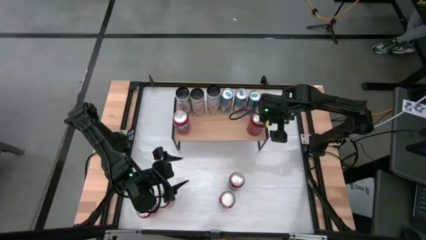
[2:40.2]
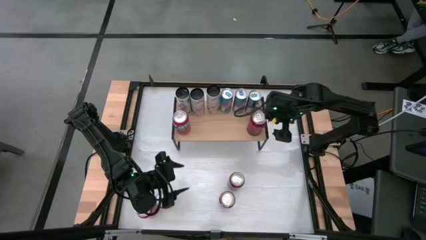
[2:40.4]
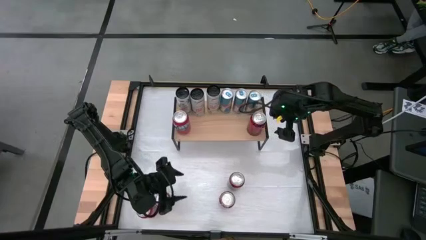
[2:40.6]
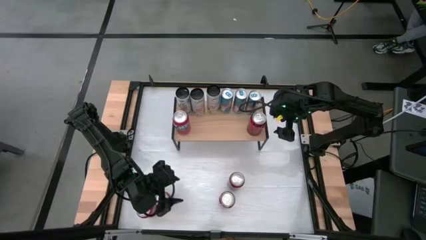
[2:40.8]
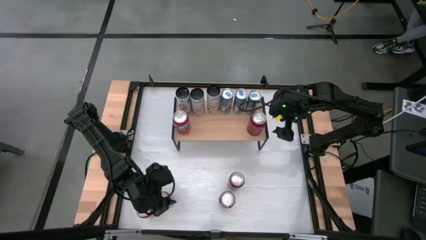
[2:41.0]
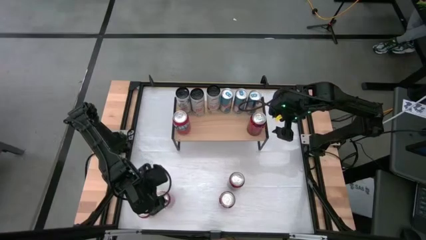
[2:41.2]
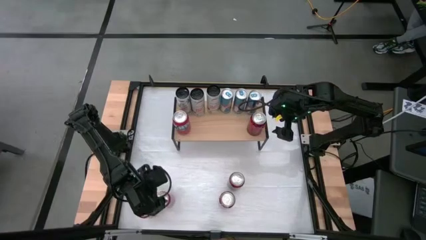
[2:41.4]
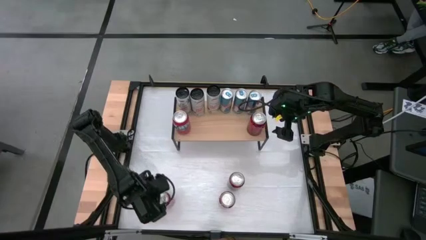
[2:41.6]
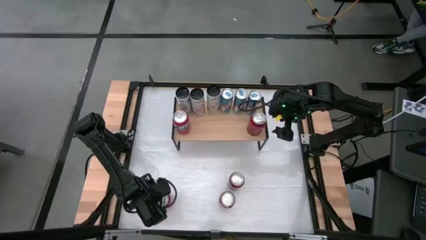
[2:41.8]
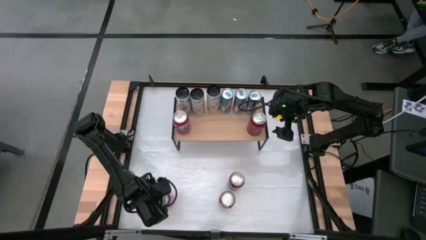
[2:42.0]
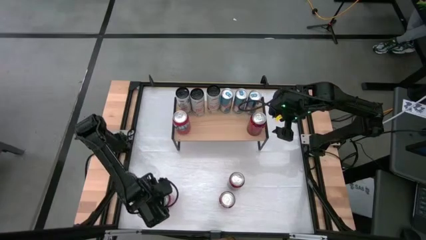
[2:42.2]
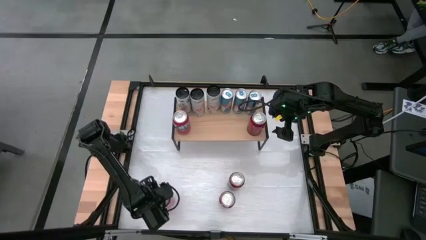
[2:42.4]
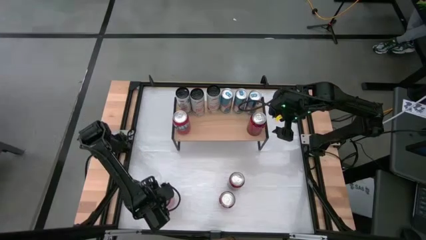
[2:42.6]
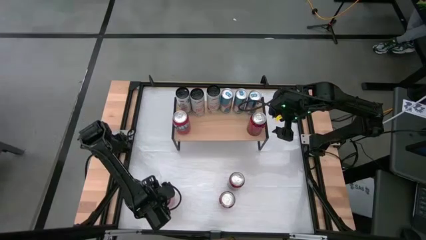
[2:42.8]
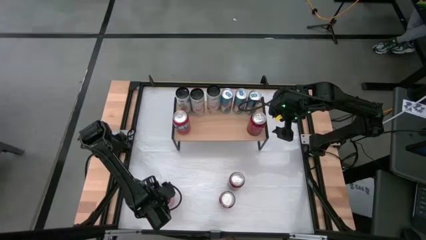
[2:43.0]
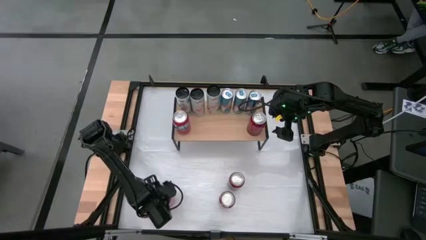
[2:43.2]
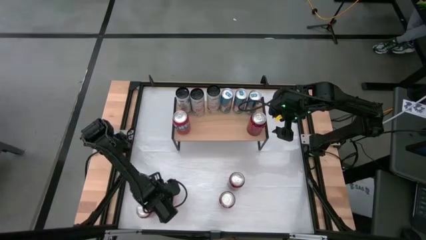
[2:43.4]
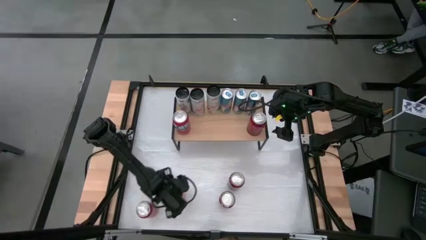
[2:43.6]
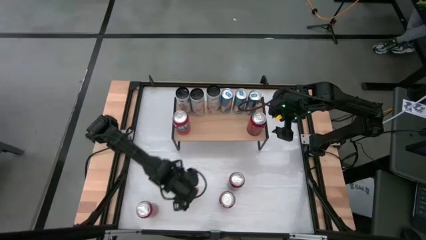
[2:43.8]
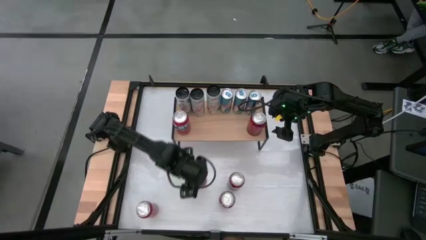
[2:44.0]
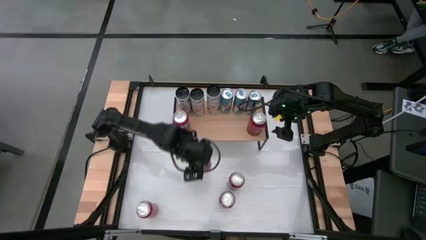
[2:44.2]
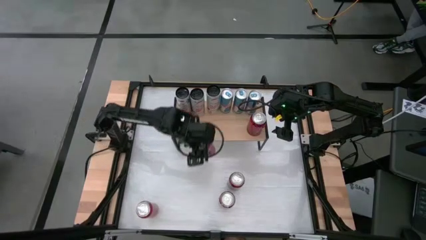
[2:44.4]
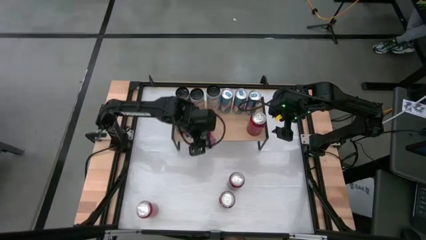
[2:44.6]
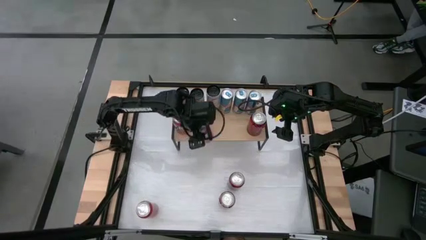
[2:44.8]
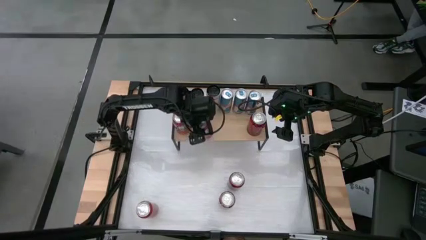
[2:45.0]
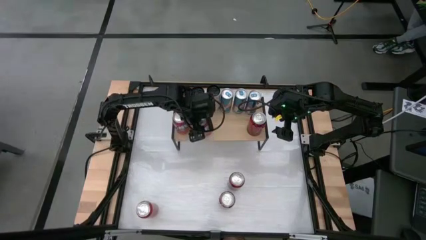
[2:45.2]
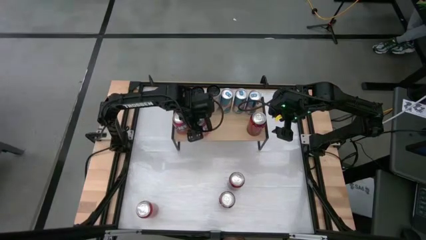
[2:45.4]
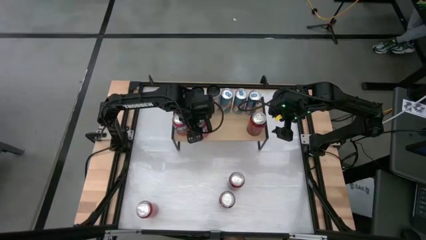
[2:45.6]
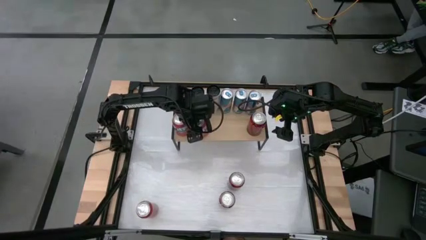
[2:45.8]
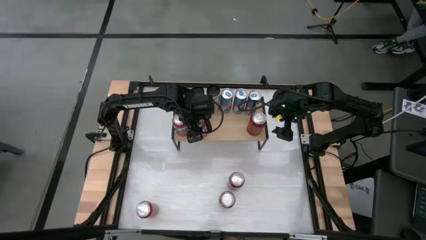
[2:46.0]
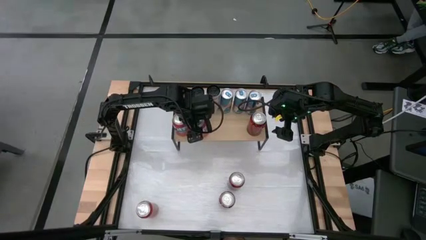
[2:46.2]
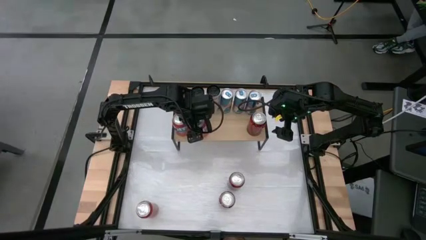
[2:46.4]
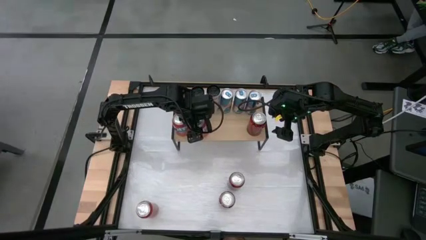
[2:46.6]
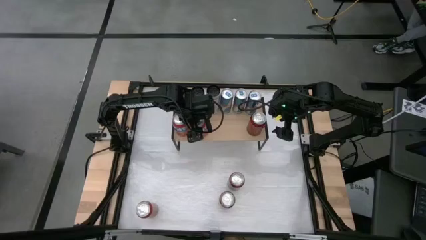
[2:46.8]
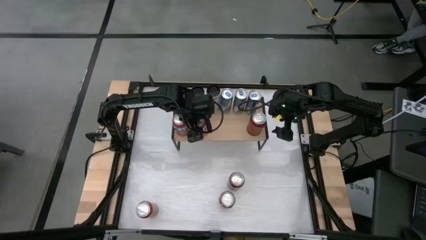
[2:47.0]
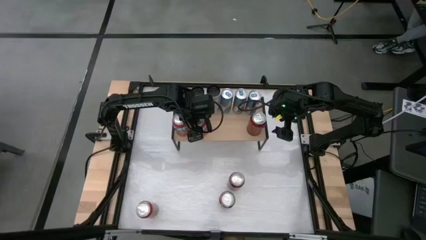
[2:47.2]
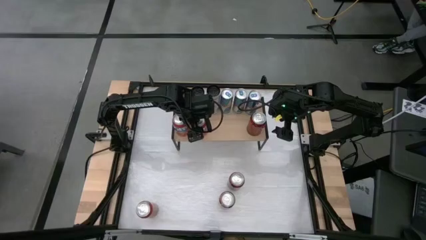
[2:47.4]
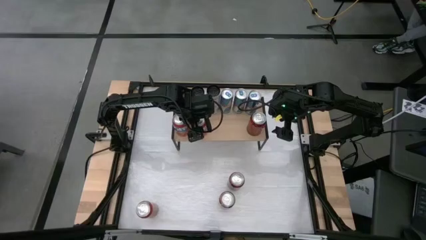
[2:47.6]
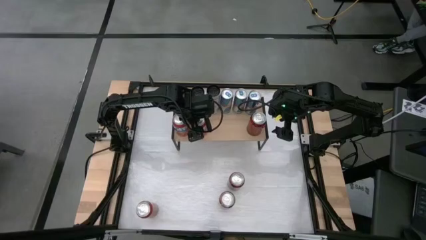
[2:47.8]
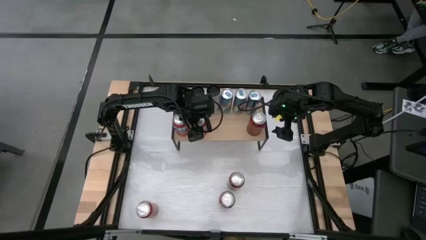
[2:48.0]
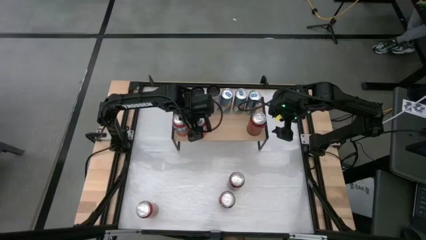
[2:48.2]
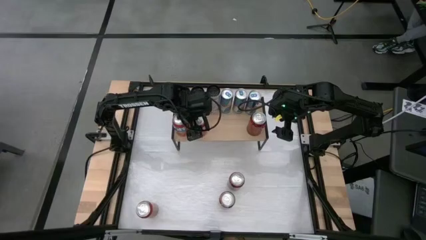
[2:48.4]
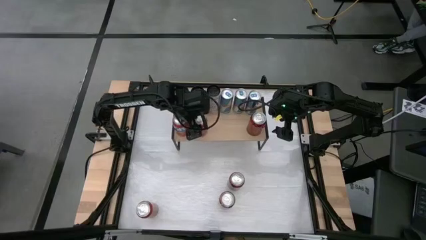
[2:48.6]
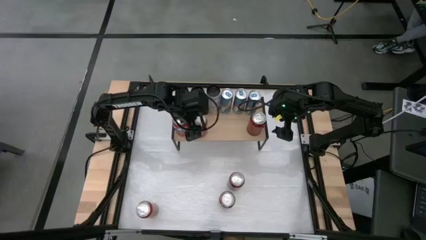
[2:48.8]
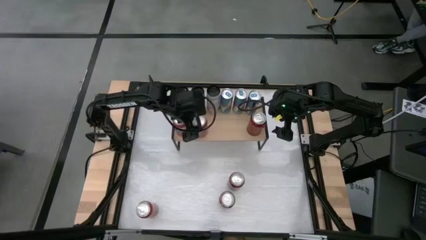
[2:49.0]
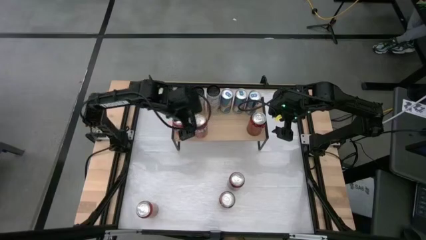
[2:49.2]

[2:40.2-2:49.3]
Task: Place canned beverage on shelf
Put the top orange soda can on the shelf aligned with the white soda can

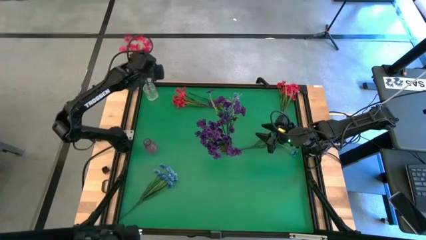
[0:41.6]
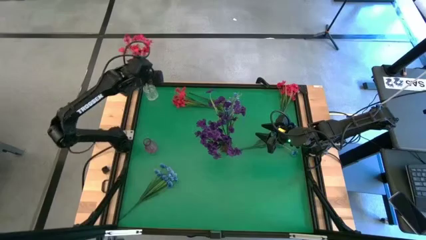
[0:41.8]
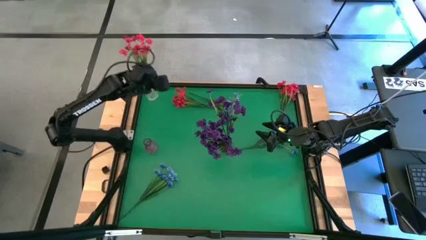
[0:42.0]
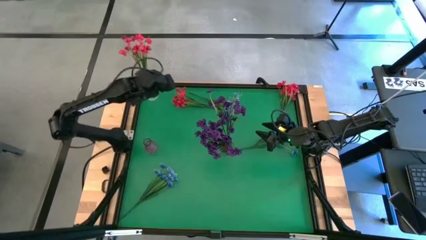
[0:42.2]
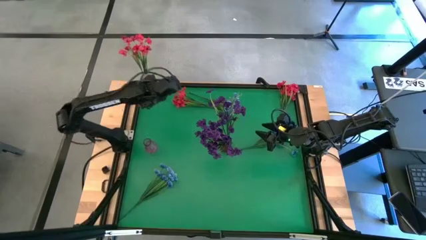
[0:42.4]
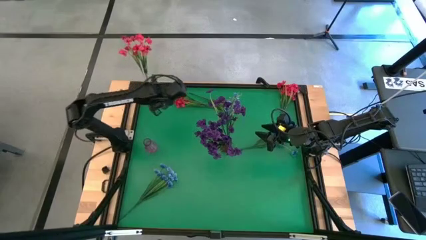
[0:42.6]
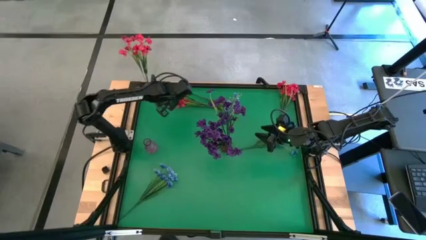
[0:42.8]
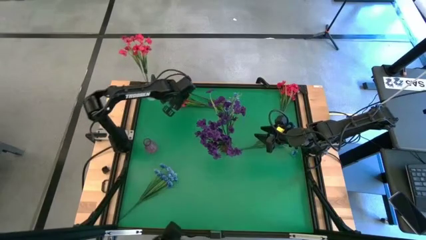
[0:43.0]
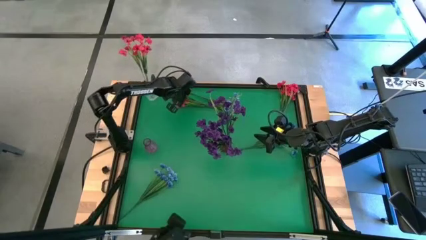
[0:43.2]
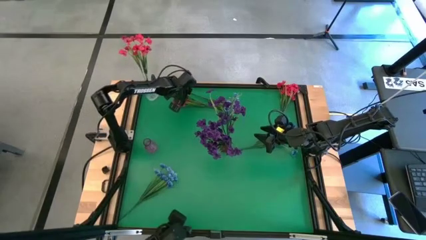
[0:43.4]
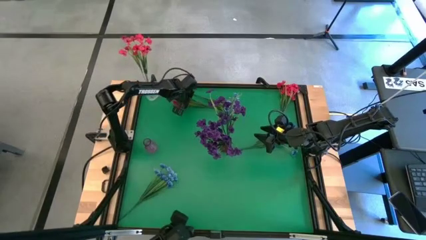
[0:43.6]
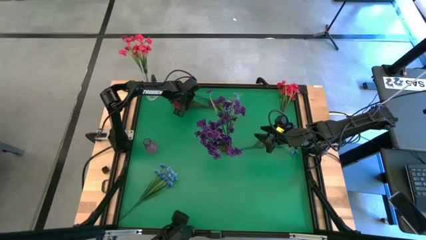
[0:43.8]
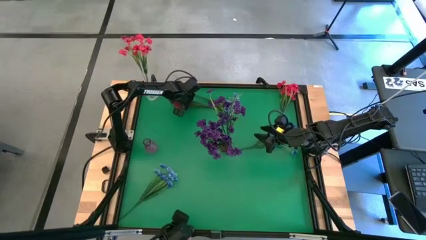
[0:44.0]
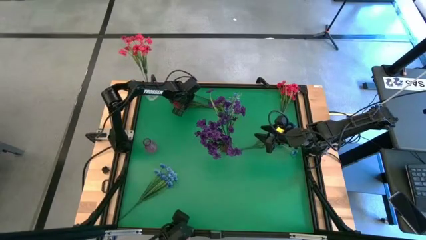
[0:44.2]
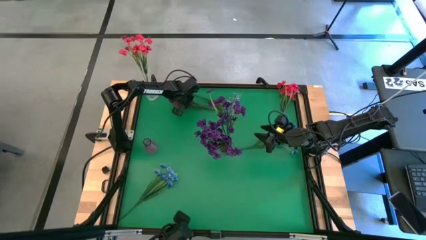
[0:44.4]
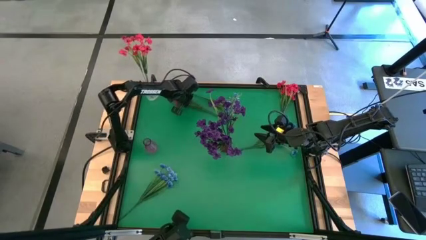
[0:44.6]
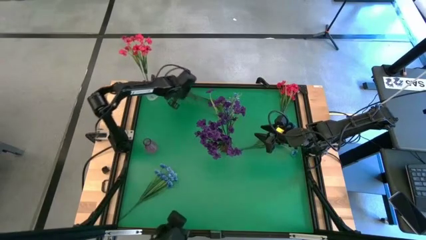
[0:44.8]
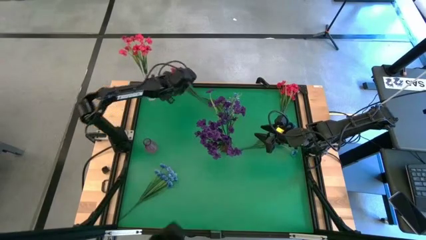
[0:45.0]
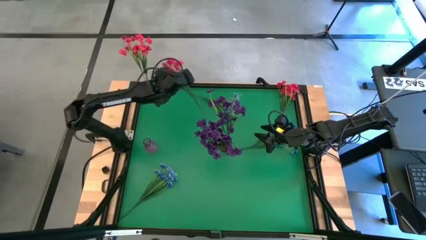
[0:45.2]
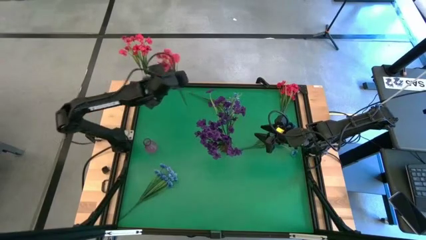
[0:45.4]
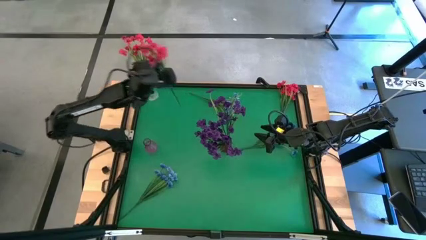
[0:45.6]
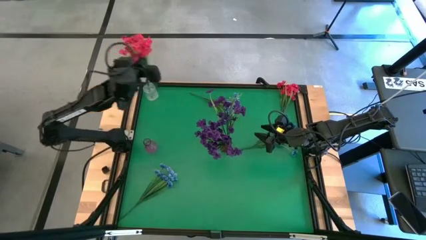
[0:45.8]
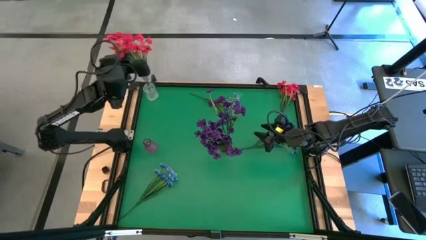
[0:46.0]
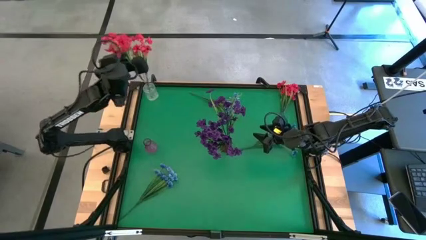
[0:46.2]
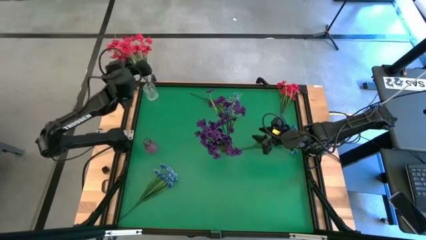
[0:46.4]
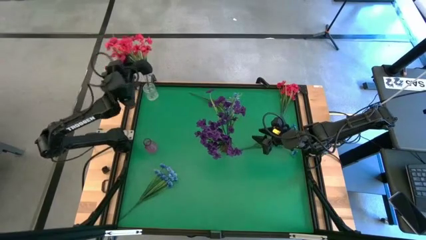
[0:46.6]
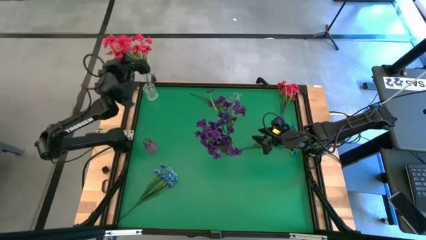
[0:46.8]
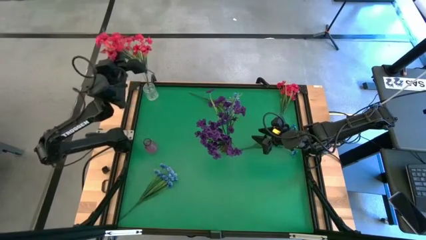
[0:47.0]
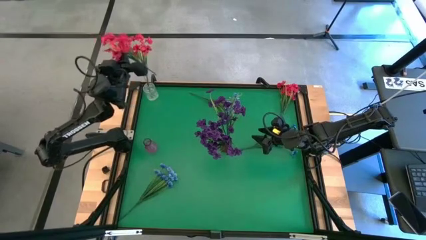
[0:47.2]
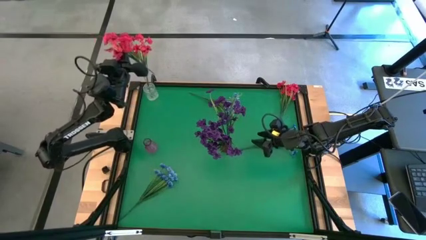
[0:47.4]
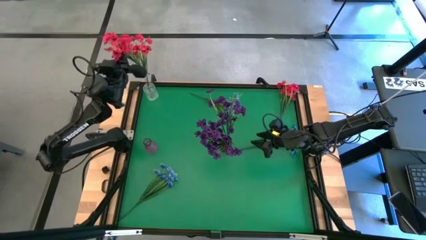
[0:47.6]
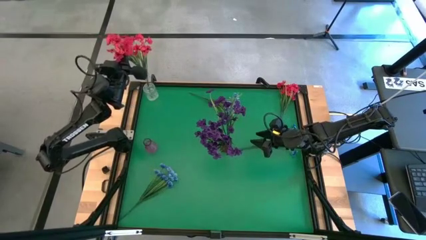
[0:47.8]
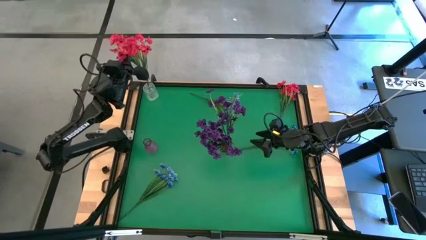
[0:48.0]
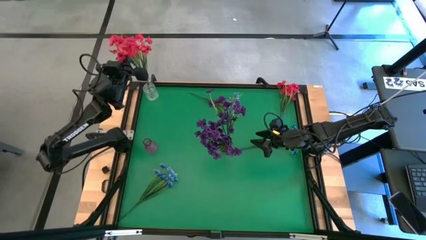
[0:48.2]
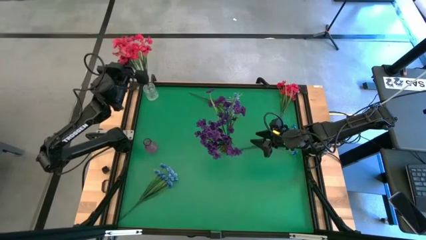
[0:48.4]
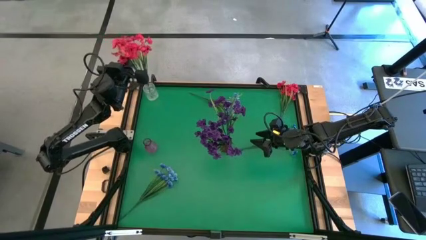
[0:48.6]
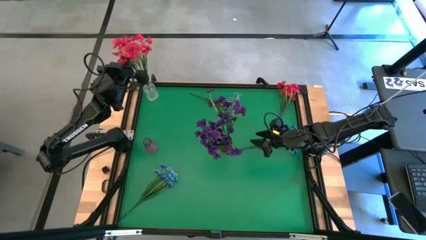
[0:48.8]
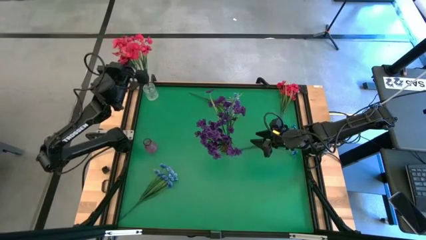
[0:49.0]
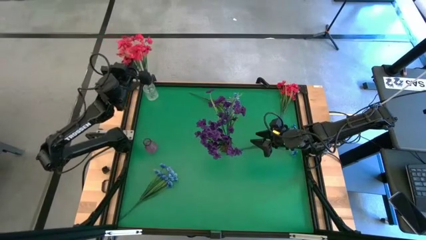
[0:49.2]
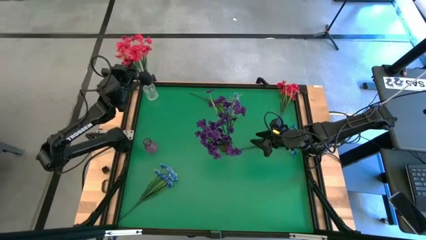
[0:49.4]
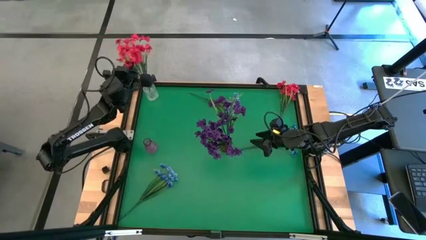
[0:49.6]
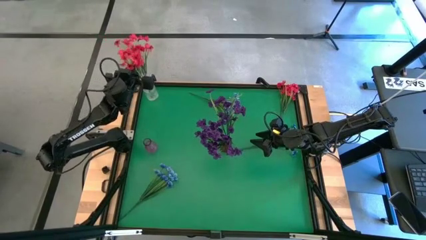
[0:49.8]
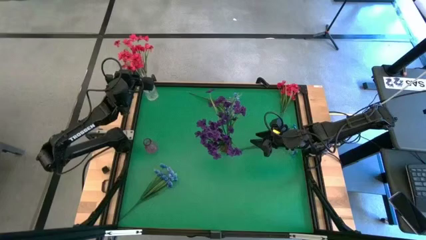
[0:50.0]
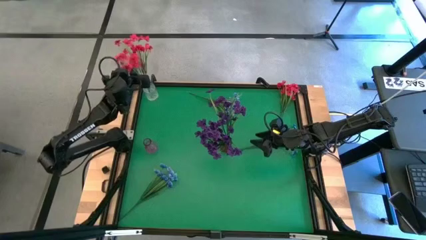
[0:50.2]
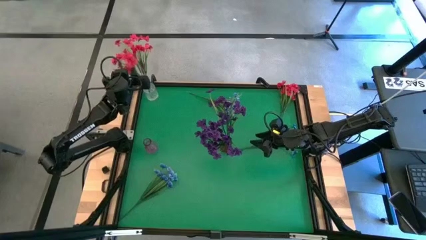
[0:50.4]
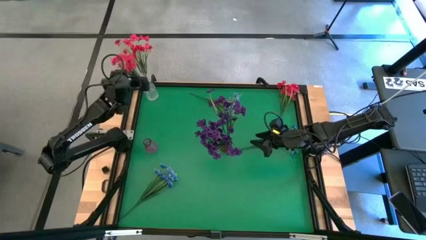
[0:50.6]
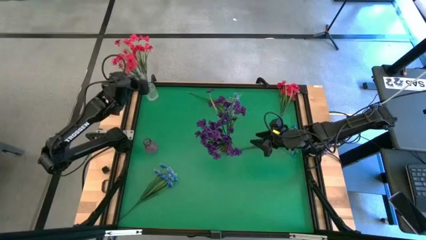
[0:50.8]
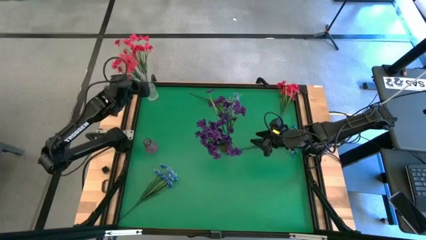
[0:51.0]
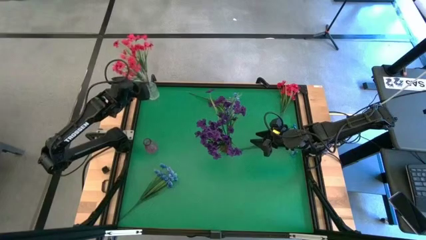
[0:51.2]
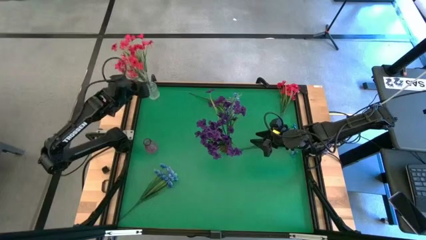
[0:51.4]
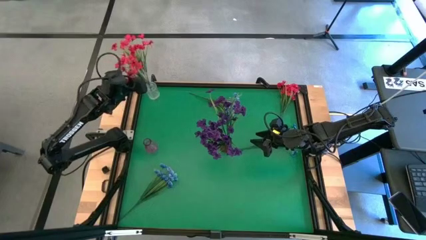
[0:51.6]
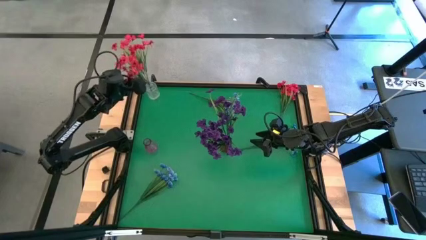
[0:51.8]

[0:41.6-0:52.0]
Task: Sort flowers into vase by color
Put the left red flowers into the transparent vase
